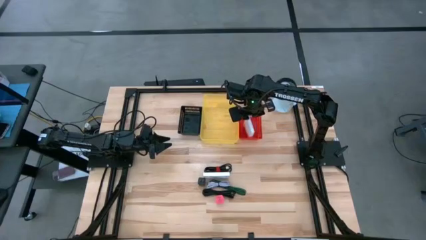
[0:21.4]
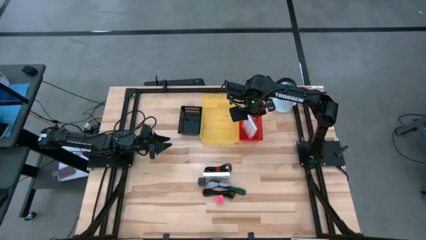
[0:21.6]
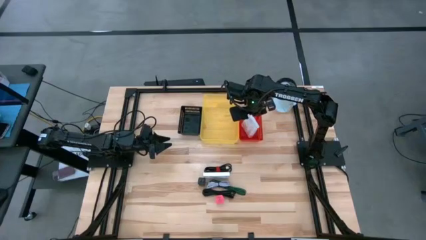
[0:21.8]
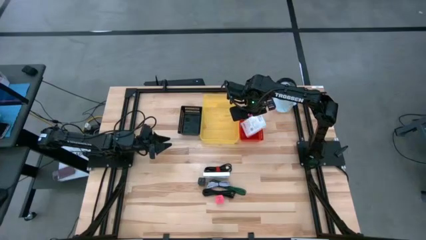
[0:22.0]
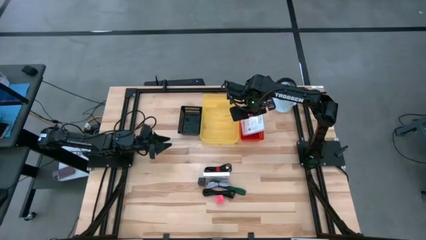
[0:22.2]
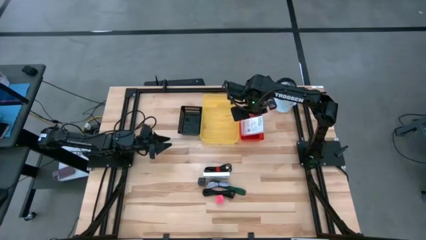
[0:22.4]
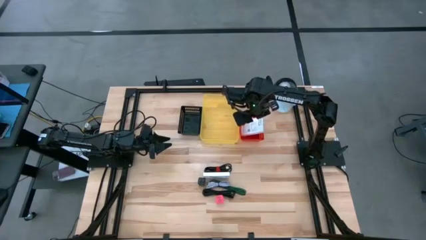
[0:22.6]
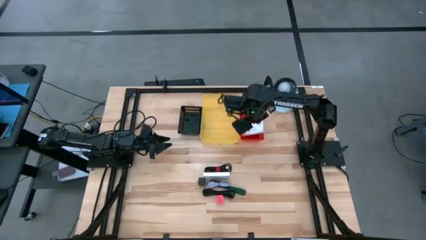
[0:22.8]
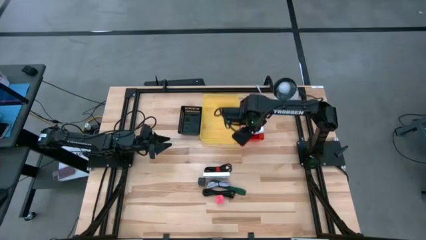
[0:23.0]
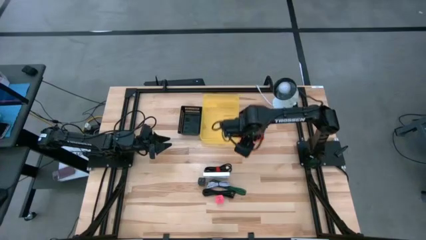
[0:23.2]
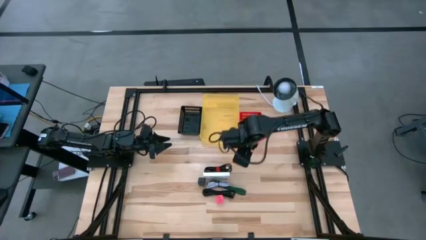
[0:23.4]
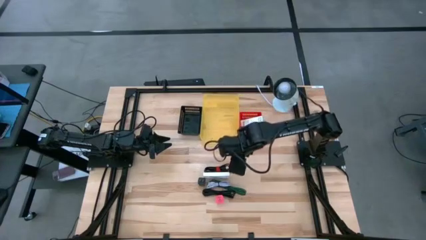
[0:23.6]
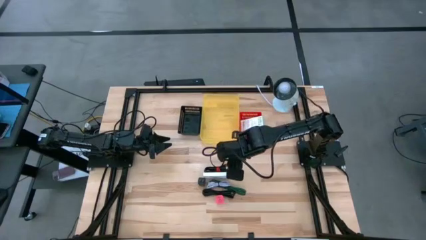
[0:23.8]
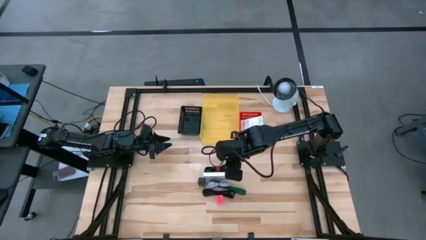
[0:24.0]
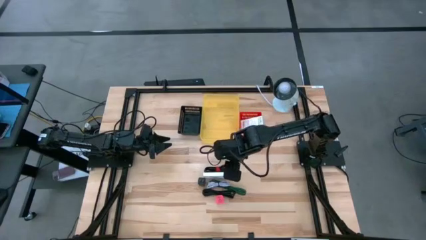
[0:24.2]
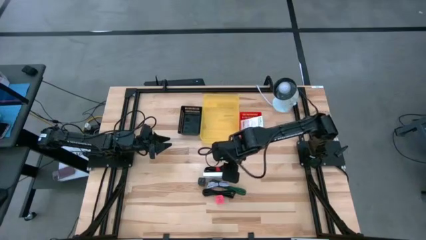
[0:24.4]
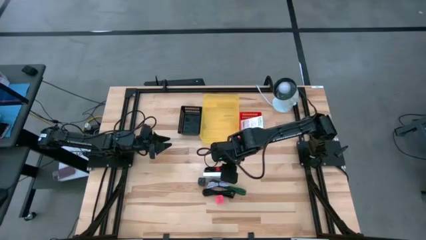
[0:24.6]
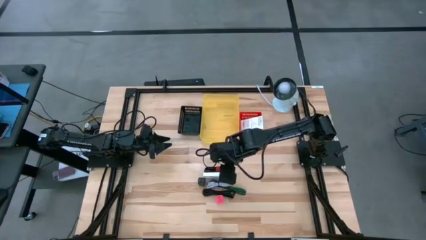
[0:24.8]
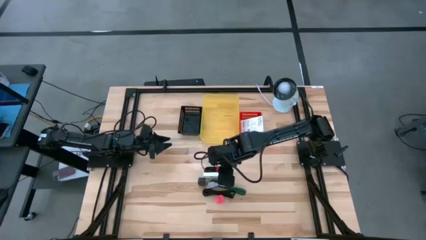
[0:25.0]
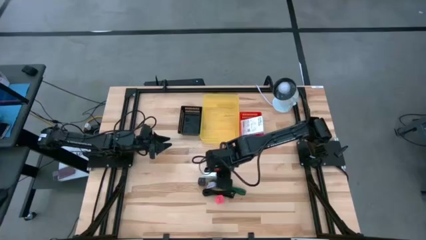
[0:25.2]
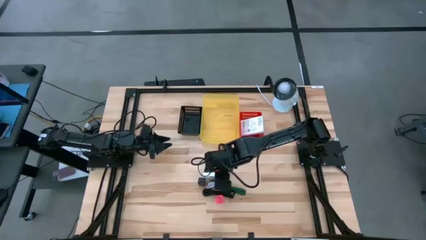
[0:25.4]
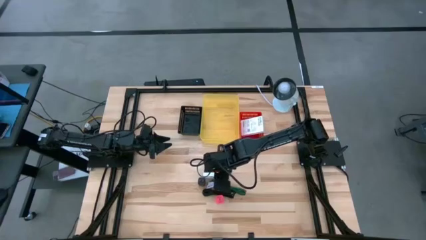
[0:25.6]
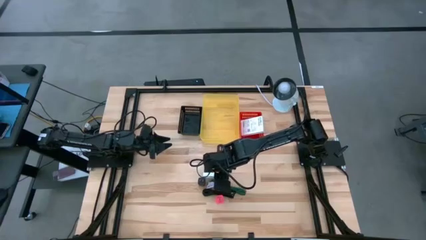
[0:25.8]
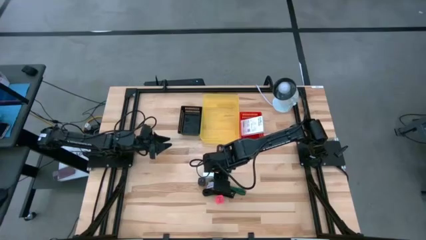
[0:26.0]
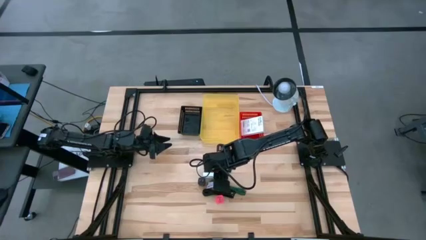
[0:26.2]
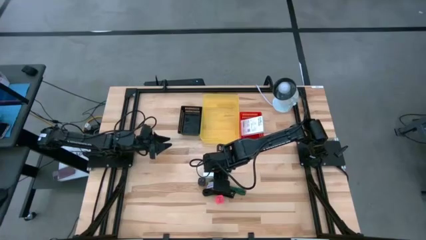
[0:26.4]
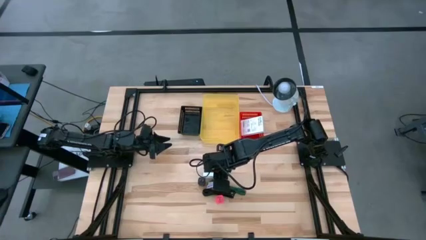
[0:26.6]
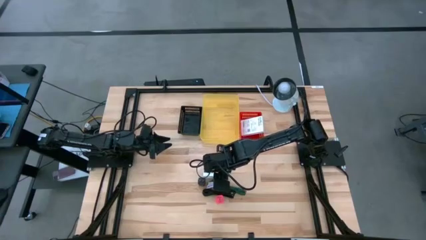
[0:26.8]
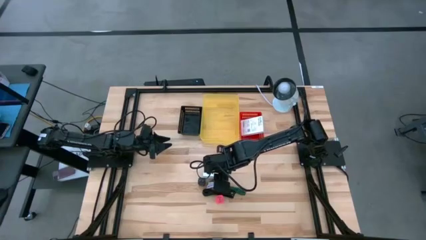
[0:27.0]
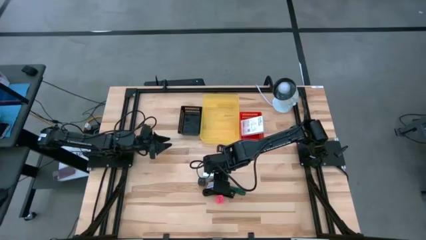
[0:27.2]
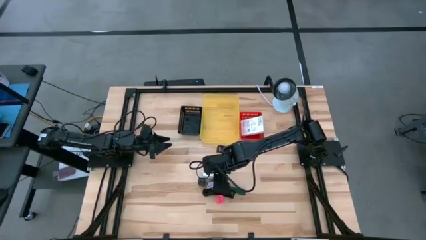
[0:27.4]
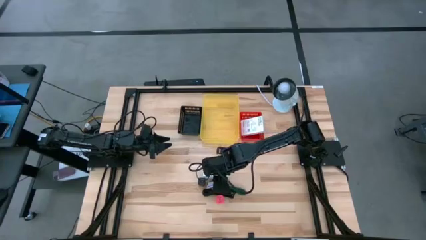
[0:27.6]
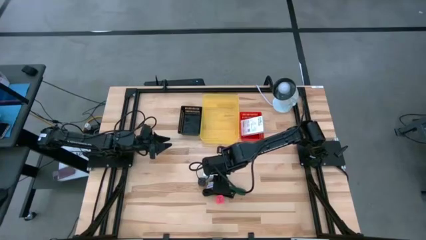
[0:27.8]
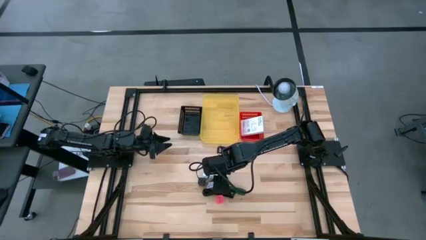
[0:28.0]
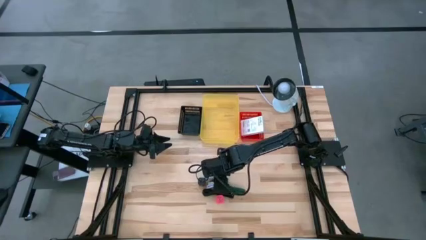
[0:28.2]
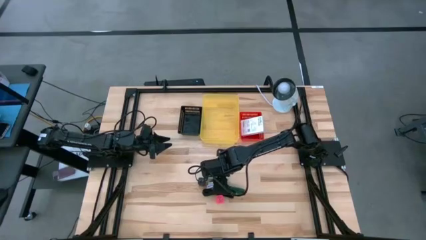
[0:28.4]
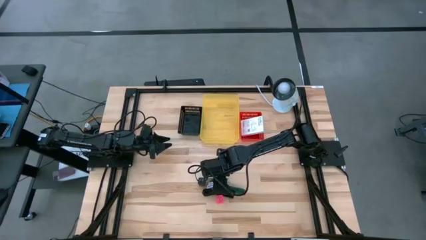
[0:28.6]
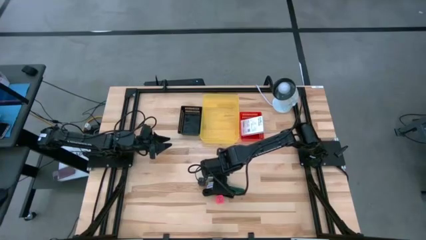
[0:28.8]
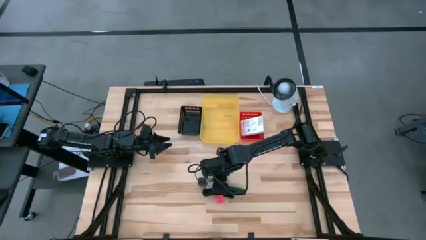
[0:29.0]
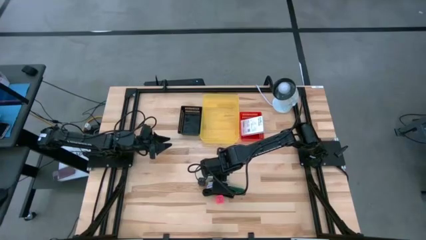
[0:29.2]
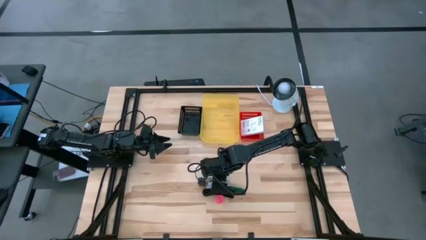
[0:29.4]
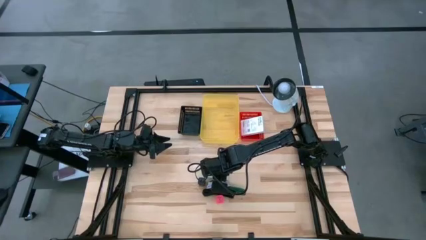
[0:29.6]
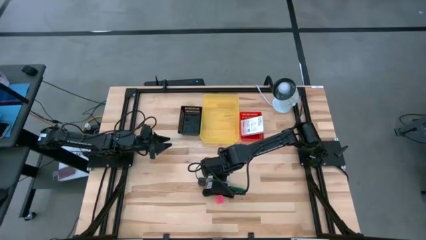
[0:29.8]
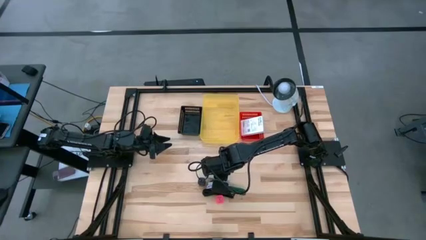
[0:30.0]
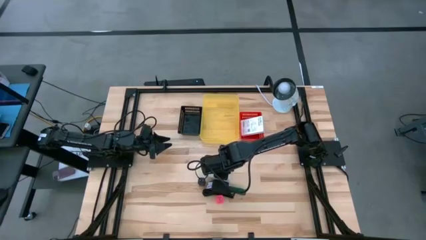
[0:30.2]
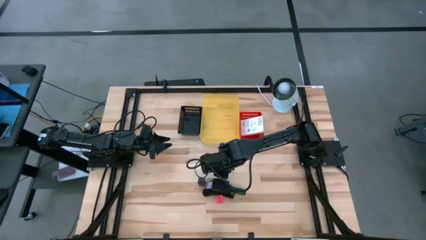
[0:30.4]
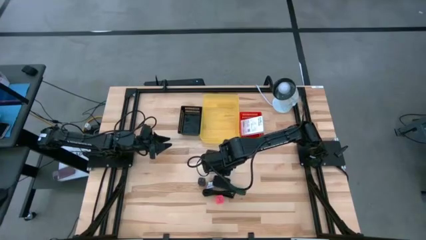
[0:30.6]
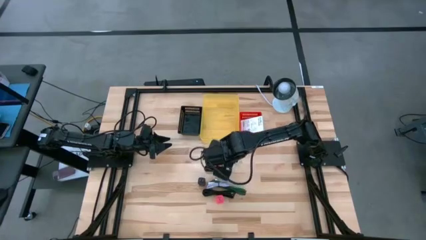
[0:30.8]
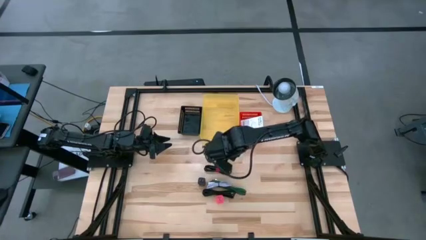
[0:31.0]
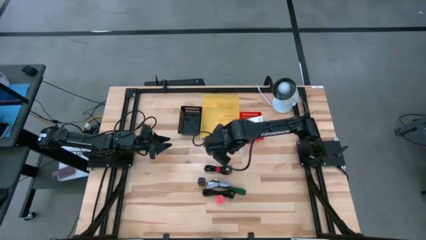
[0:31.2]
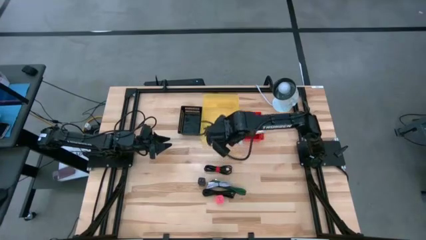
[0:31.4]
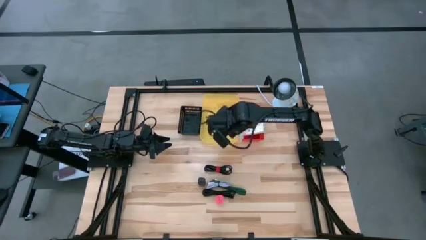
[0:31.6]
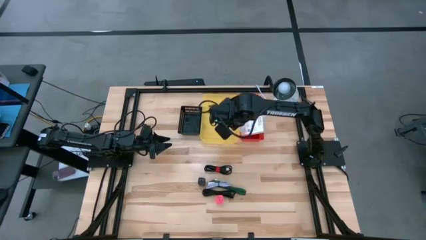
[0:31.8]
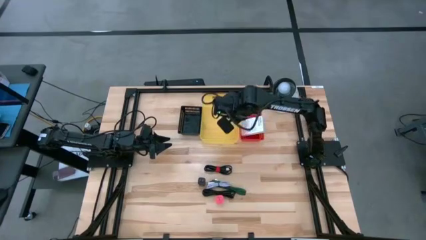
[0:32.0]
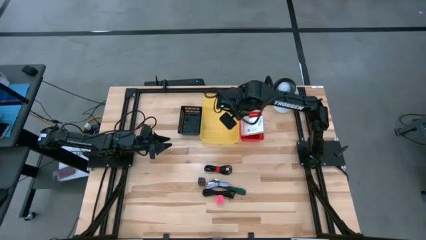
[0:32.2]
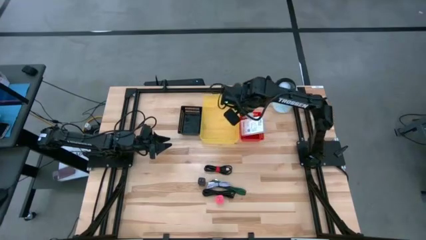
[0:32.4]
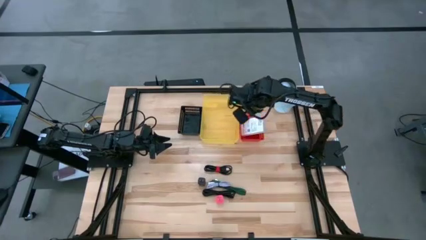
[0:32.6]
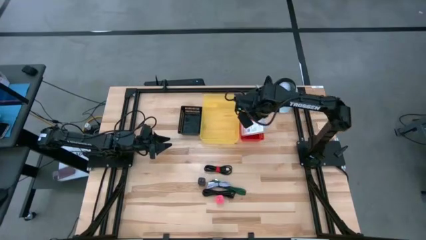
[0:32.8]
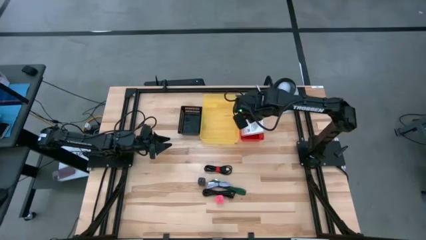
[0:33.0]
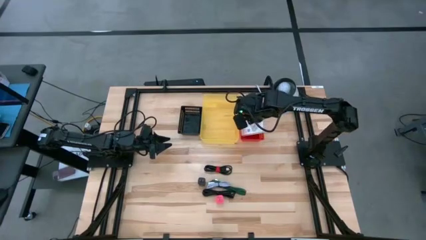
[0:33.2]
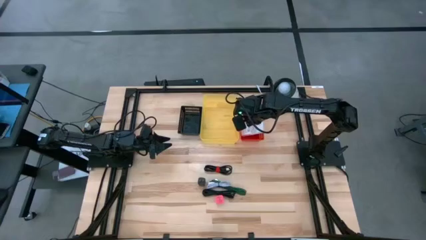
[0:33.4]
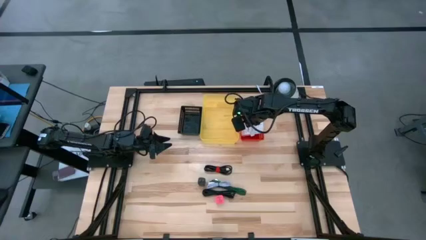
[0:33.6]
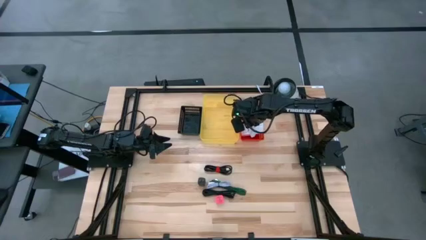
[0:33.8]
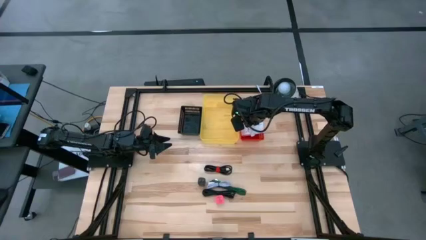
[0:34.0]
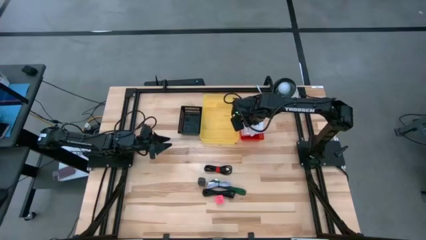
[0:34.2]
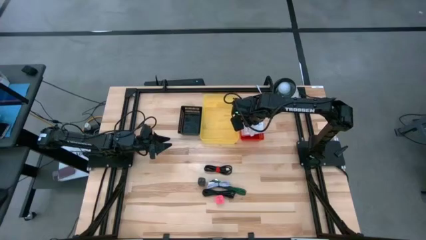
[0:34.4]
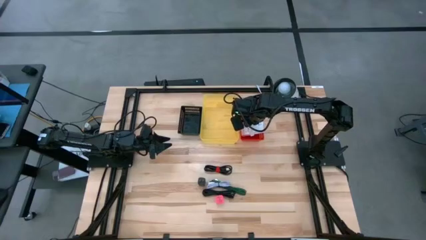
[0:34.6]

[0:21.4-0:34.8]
Task: Pick and place items into bin
Put the card reader box into the red bin
